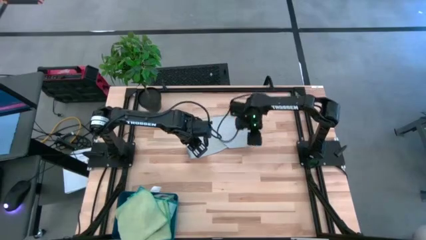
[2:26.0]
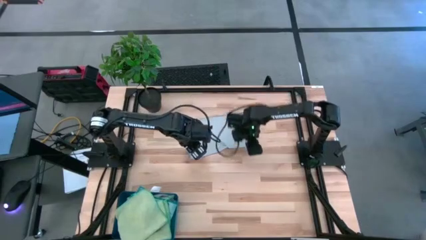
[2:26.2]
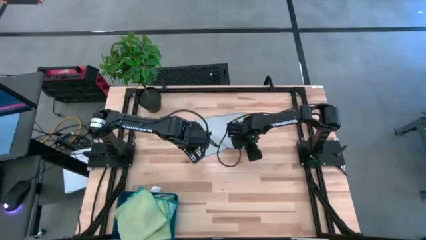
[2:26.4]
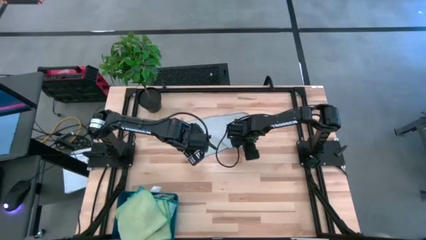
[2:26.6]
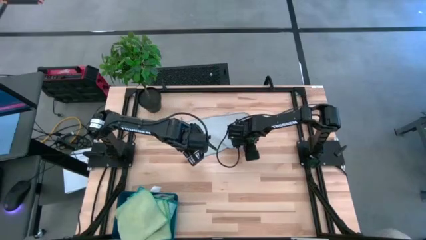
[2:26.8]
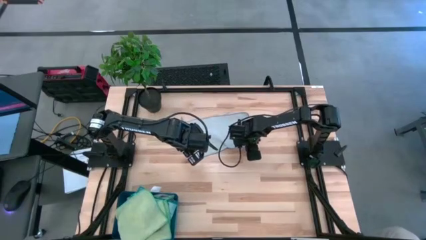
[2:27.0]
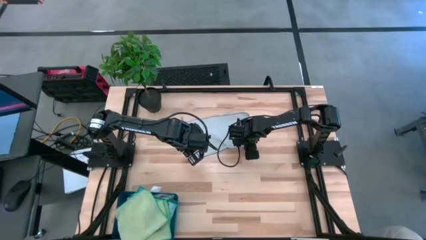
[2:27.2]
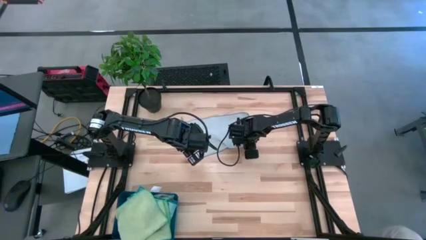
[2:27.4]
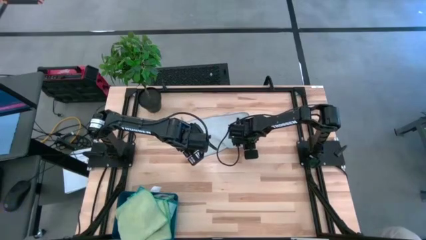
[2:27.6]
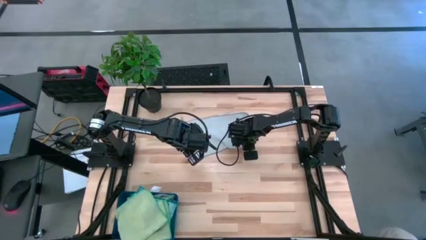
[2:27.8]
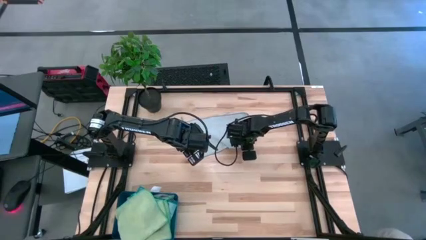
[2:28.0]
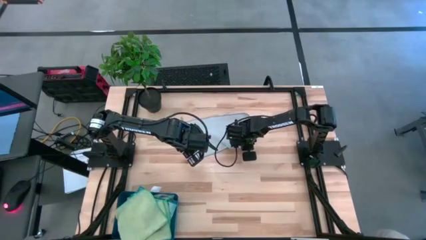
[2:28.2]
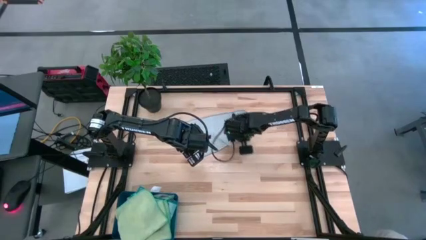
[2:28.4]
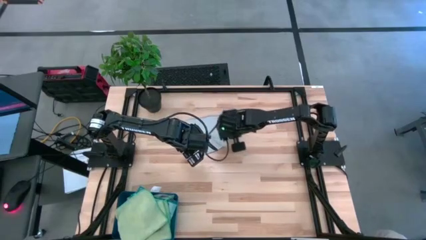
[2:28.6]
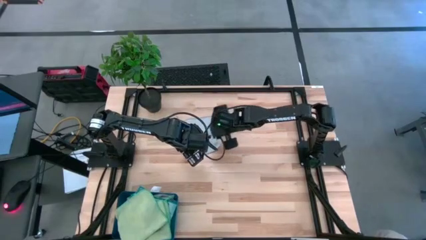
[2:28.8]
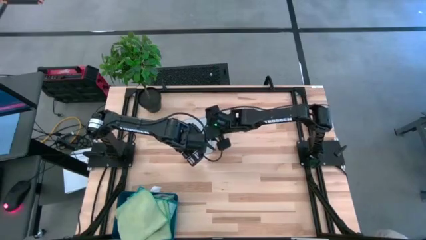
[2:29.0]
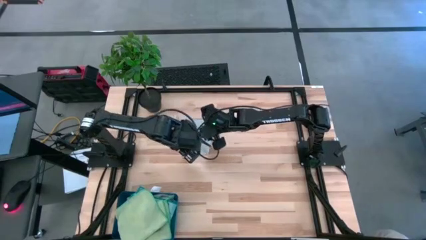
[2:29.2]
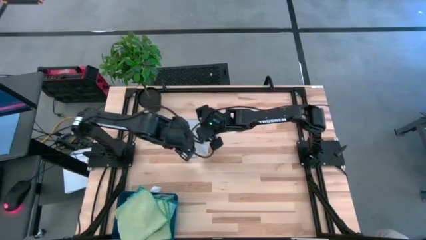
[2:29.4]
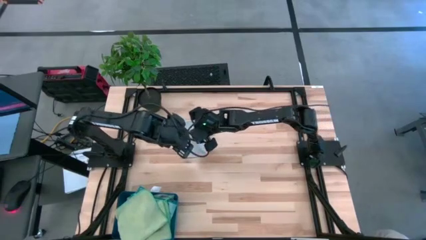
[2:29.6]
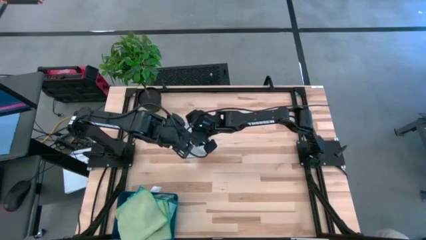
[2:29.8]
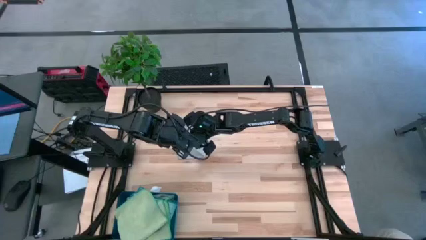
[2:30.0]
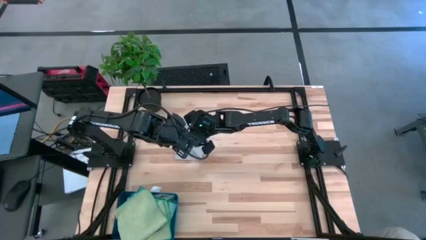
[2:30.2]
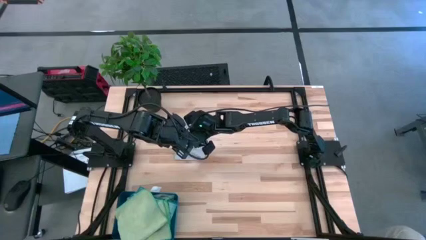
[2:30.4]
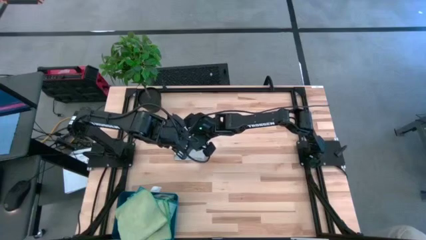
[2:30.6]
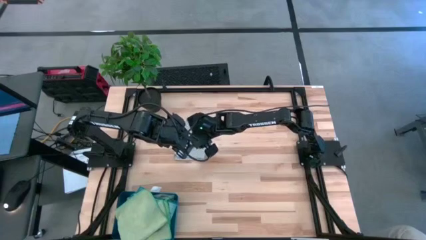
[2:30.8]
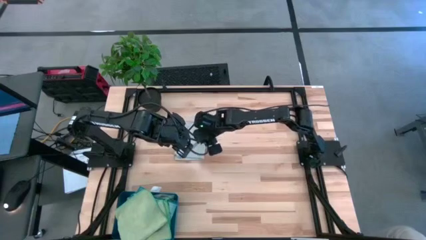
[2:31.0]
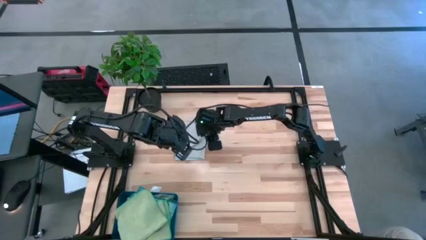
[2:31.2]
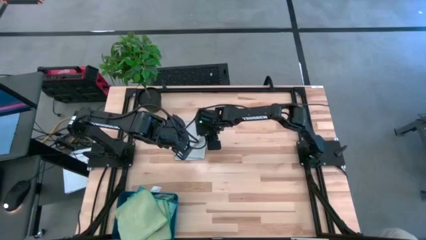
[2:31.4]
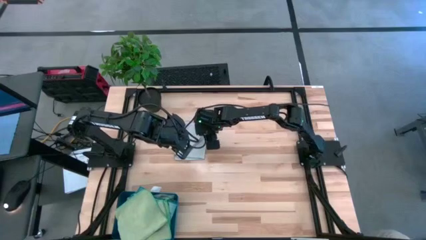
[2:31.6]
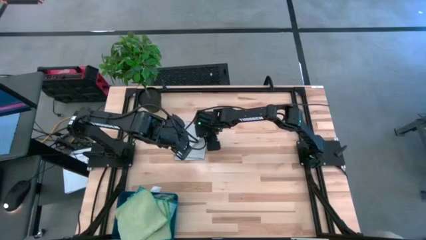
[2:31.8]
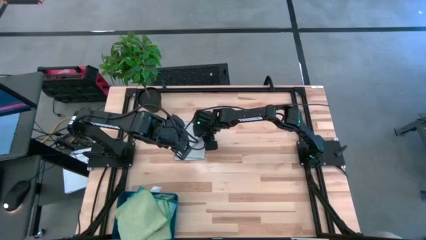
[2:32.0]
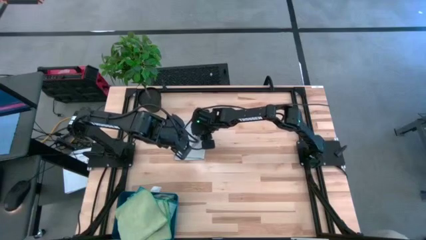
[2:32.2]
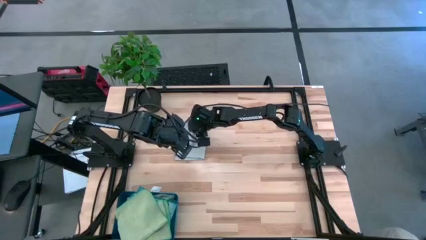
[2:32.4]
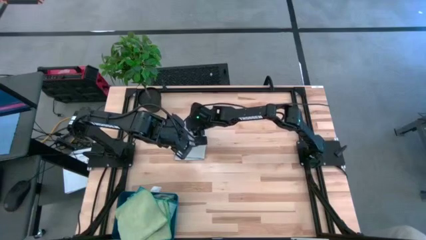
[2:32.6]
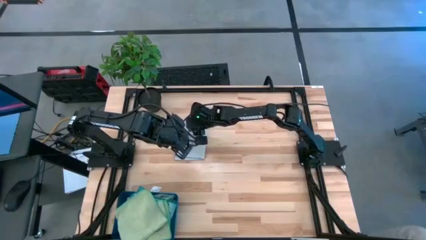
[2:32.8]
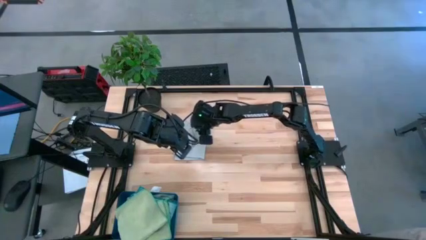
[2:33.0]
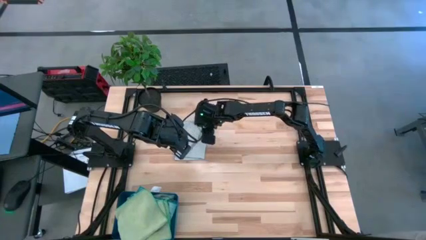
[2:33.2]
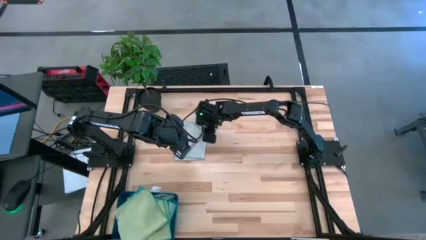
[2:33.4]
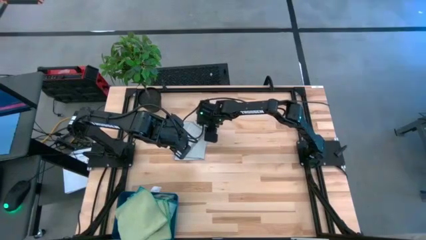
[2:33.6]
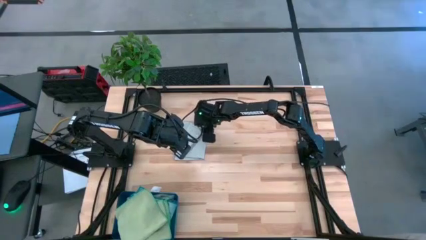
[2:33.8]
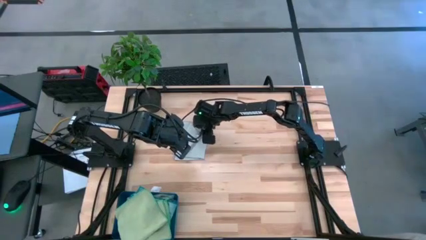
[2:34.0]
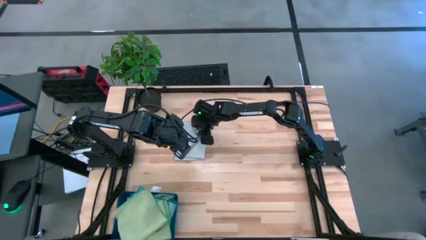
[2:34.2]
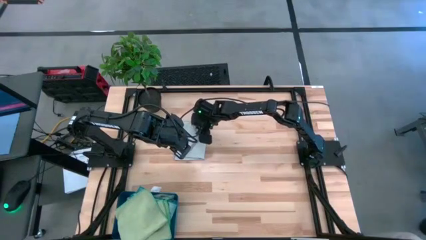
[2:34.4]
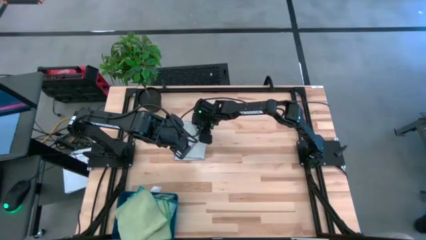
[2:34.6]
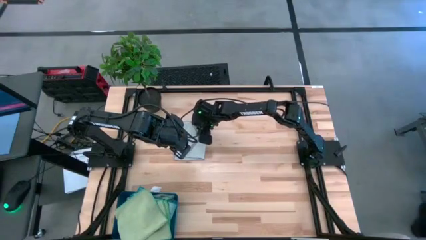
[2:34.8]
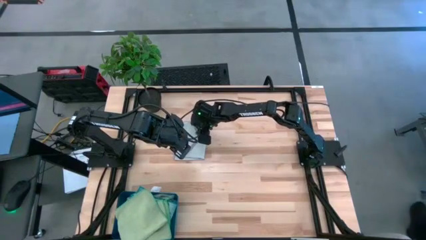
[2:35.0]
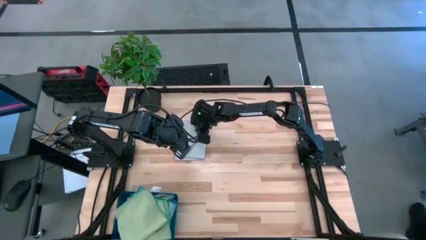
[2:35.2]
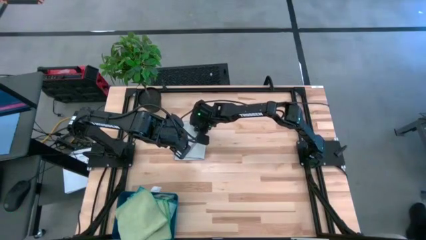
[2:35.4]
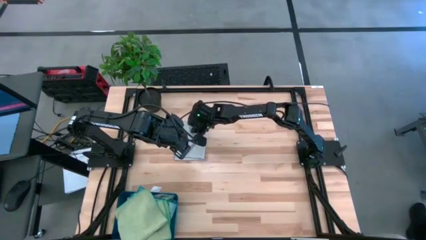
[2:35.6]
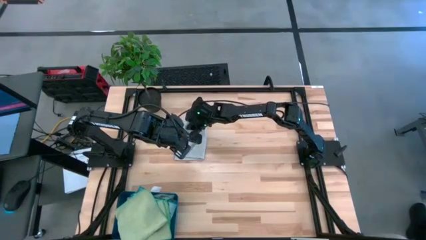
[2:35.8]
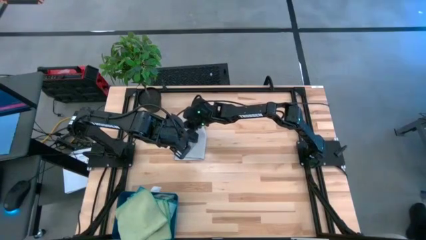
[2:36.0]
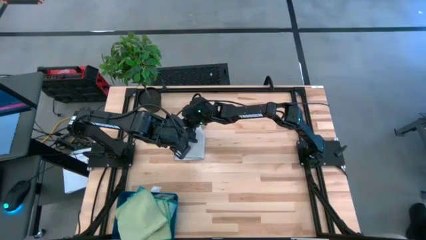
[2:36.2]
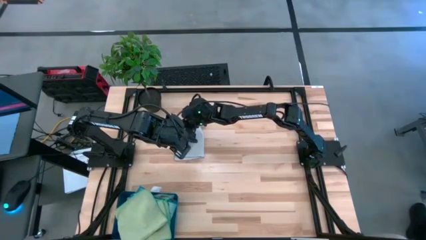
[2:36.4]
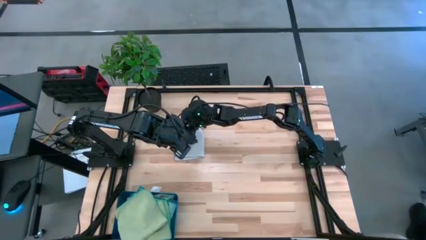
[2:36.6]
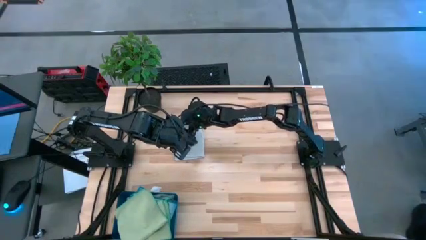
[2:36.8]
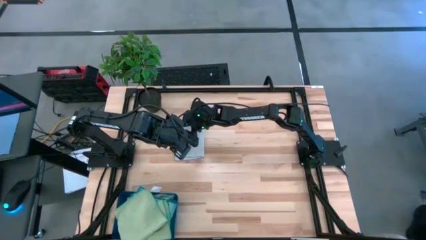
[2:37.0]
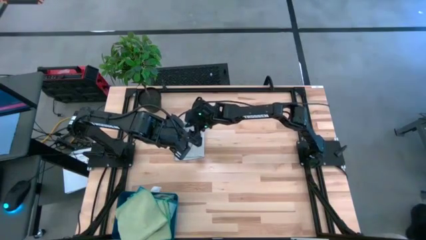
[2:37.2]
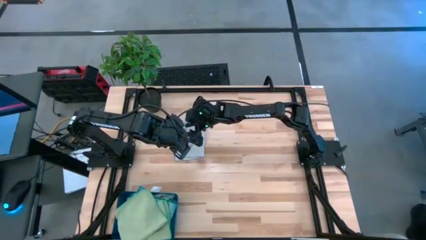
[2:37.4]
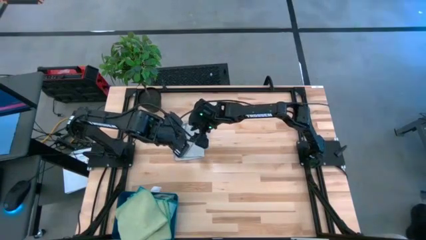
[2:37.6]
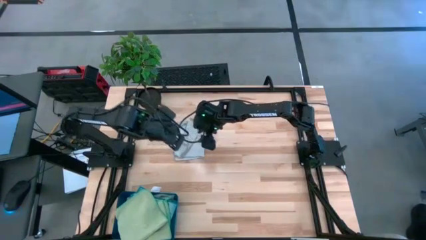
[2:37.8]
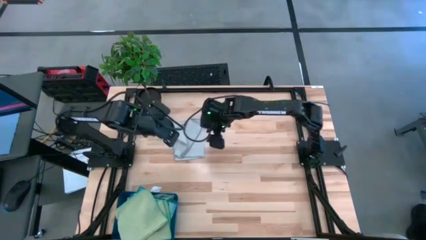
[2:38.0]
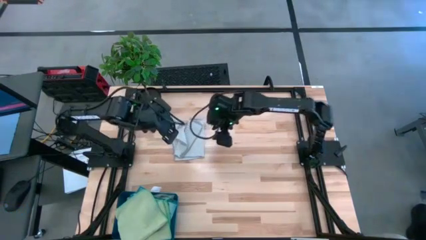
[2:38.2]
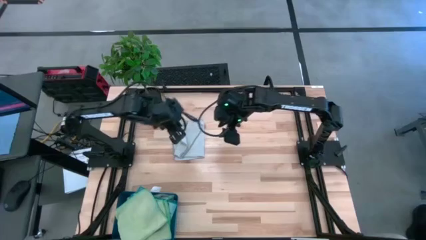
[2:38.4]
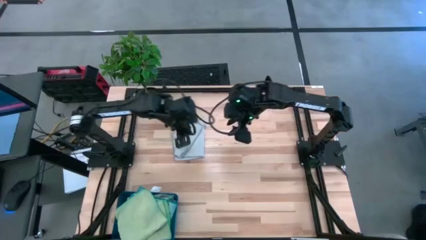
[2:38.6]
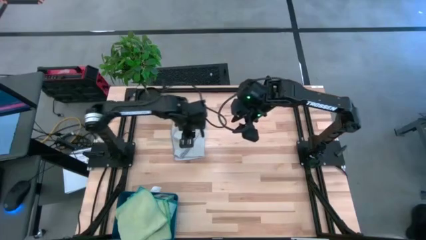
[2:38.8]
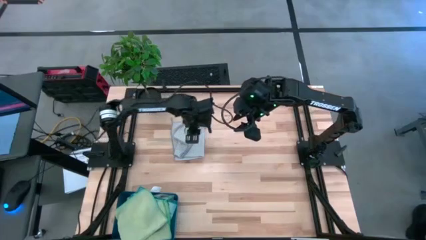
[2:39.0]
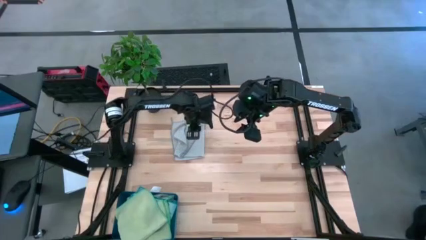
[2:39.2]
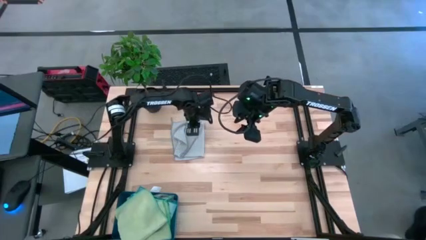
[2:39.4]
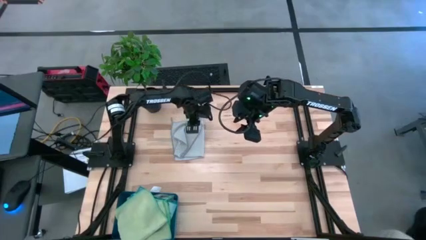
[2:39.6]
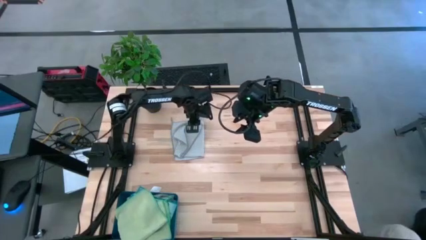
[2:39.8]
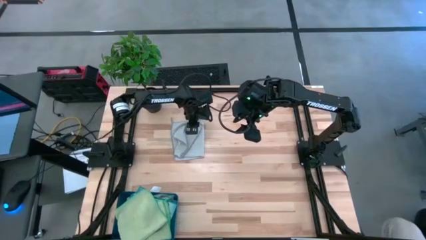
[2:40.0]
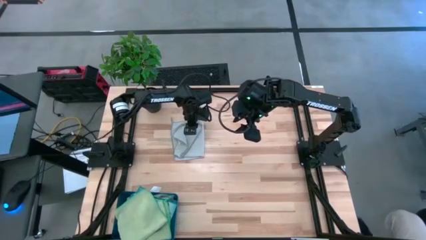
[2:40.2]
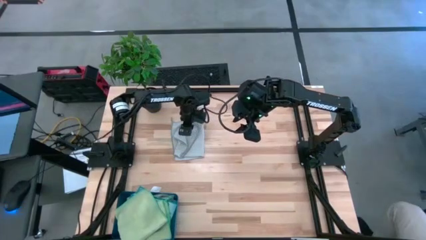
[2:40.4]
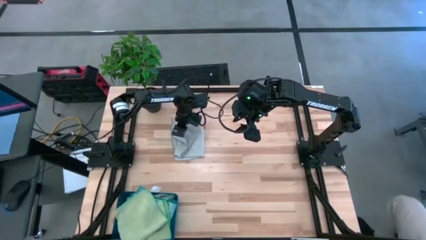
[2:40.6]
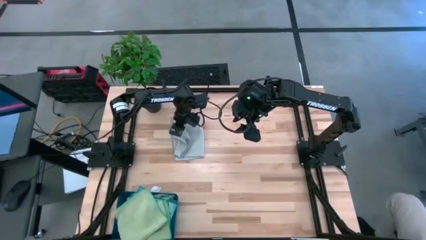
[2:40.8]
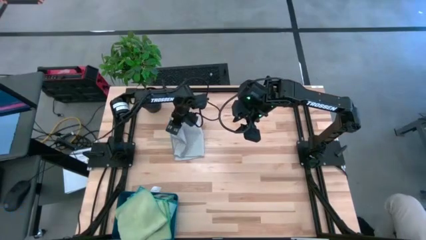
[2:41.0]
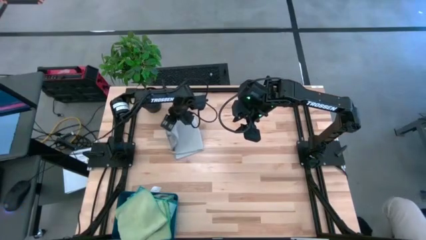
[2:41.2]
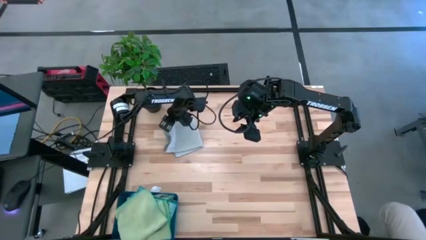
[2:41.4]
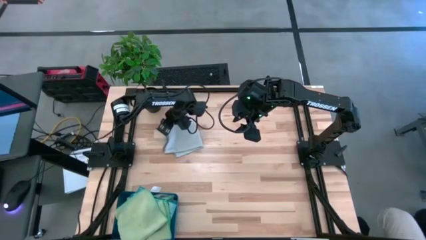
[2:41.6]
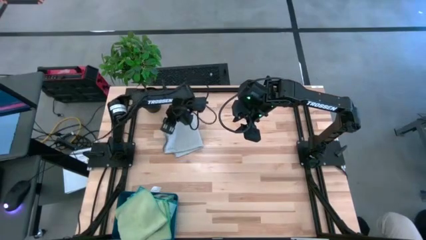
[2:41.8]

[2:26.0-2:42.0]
Task: Fold microfiber towels
Fold the gray microfiber towel

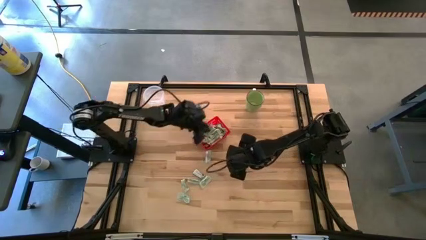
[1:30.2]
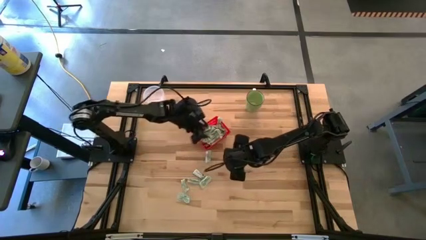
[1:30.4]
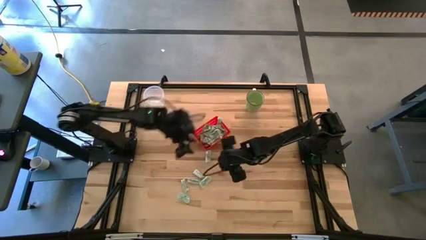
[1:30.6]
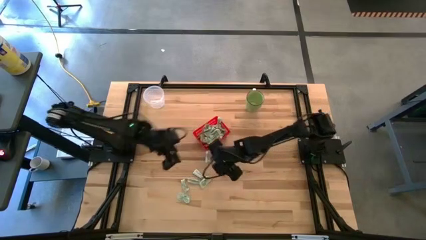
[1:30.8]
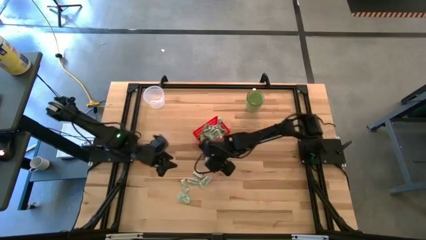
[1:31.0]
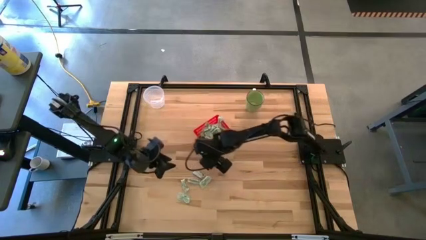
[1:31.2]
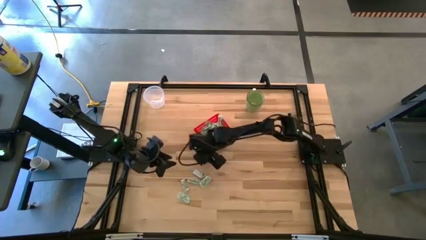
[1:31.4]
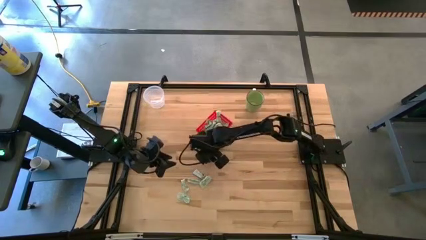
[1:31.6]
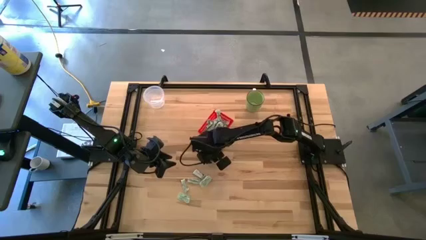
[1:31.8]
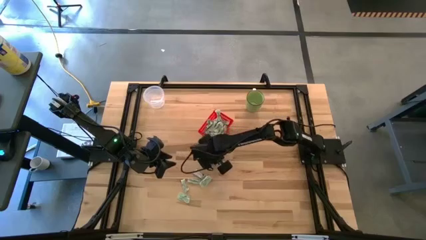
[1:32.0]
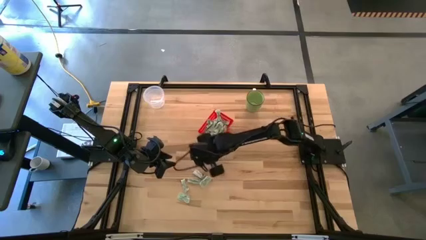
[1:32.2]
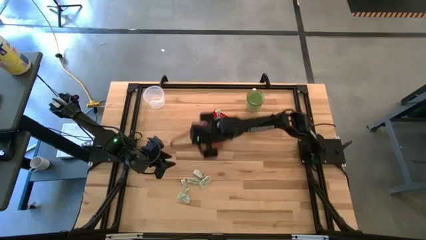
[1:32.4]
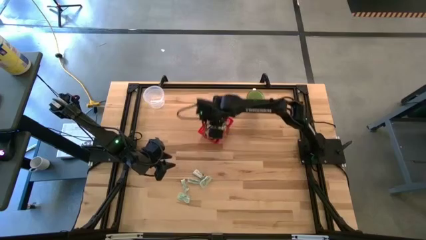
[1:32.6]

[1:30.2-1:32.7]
Task: Pick and place Stevia / Truvia into bins
Put the stevia packet into the red basket
